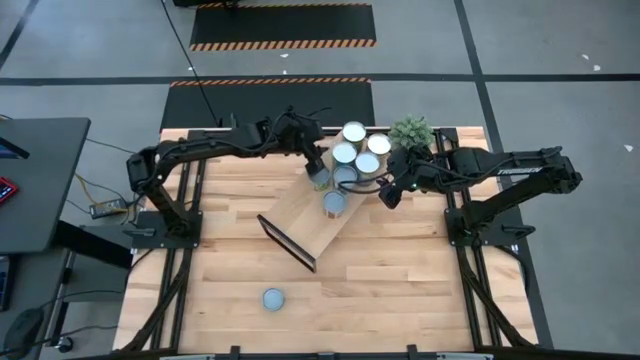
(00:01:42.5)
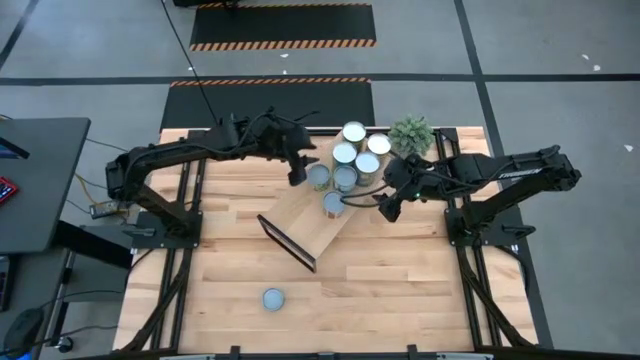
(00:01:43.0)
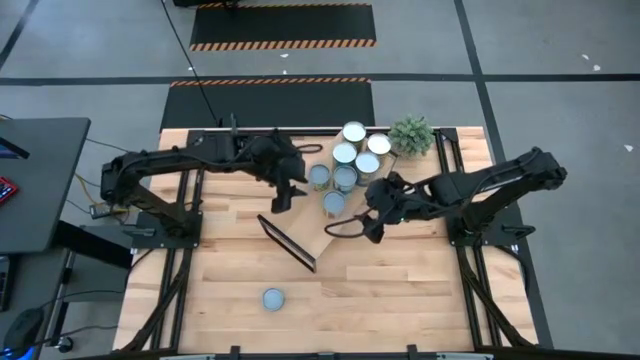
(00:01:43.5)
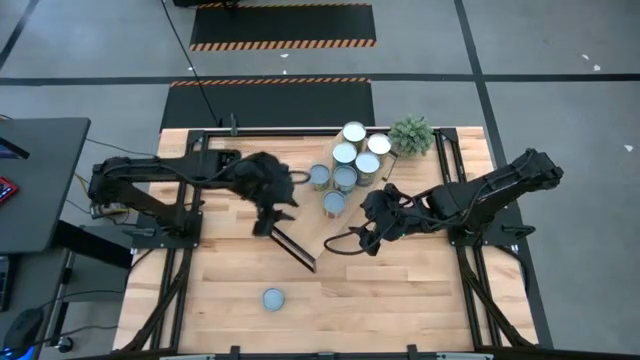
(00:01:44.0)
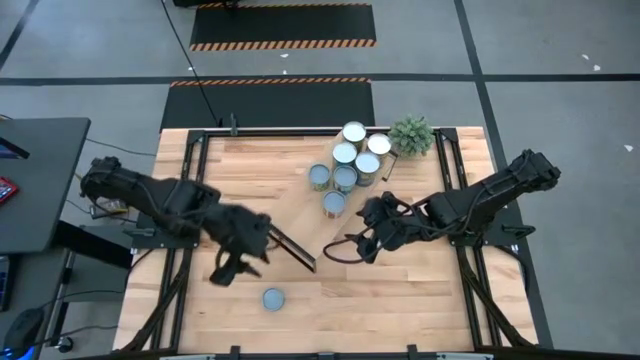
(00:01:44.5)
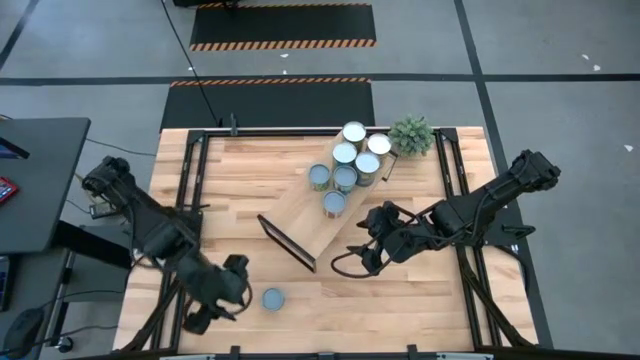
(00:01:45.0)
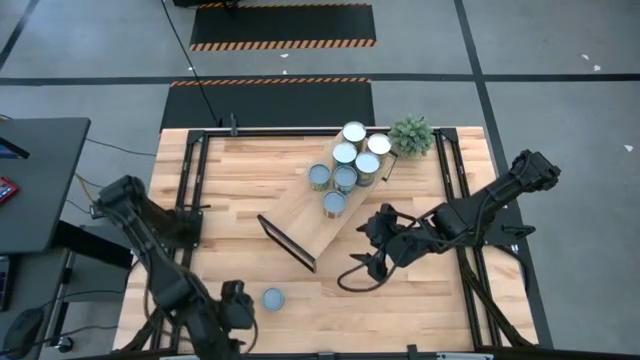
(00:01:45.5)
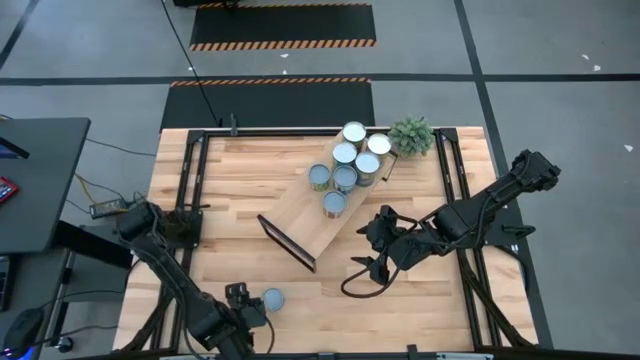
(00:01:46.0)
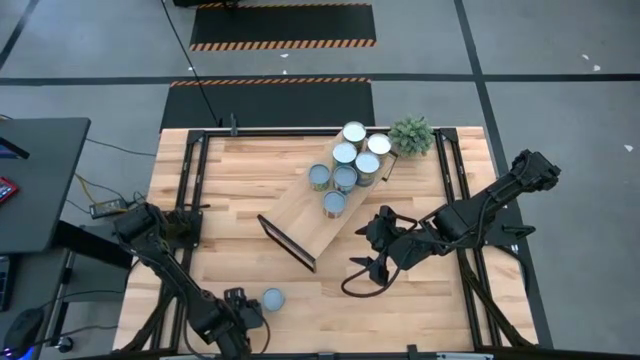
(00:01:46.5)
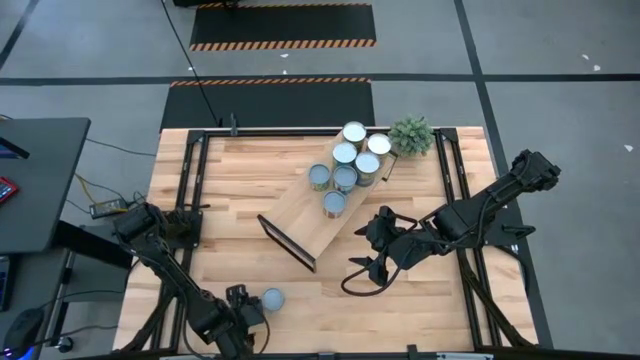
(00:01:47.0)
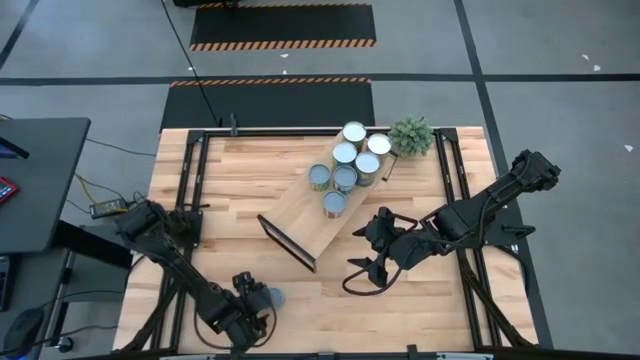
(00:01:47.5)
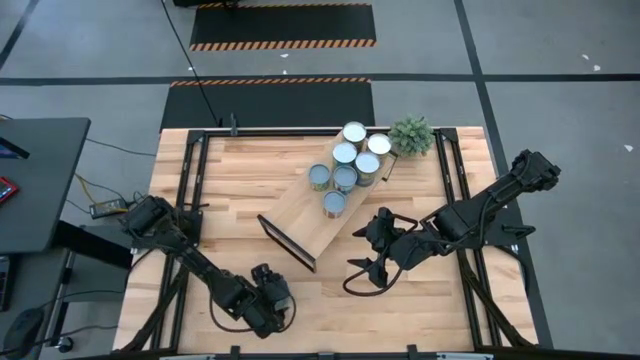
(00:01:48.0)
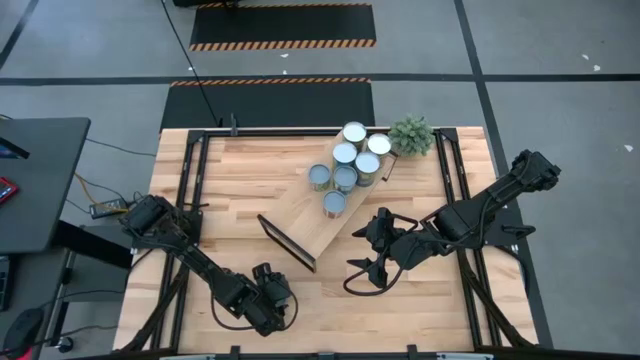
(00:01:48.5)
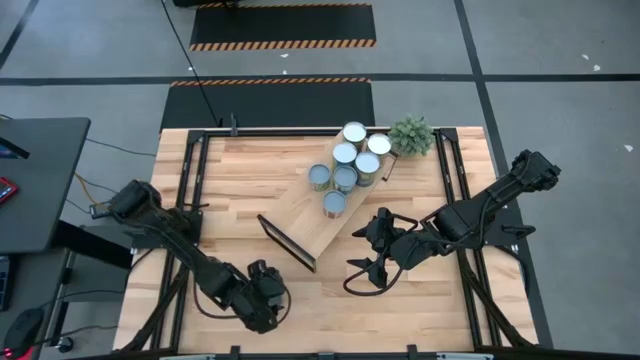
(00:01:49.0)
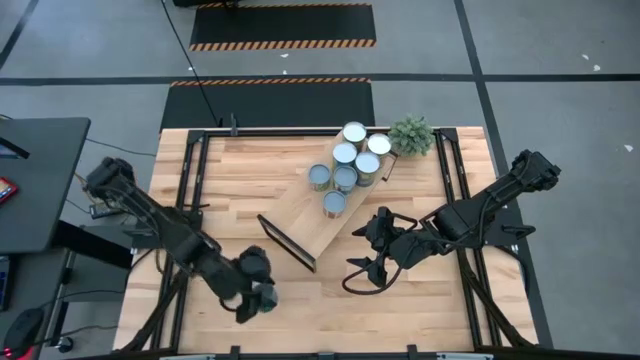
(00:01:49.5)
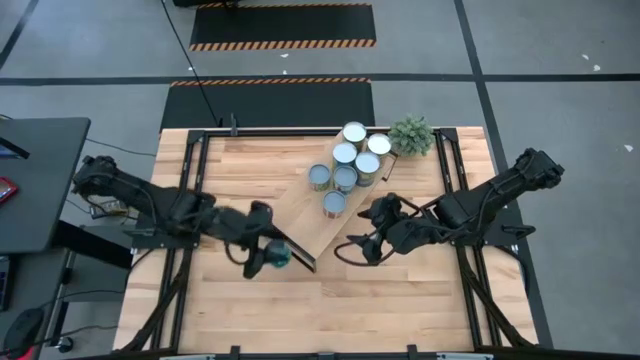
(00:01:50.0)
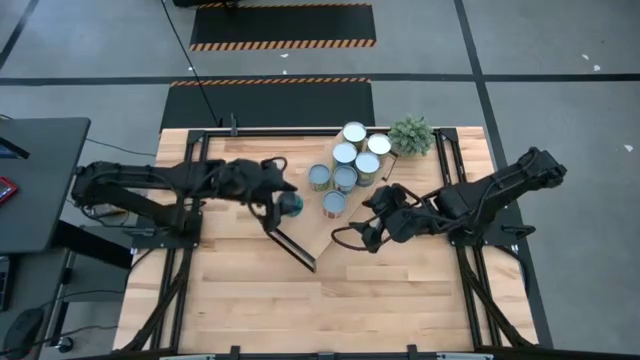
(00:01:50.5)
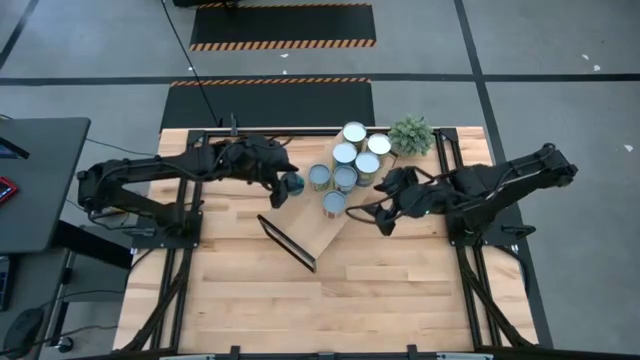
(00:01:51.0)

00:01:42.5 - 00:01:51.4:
Task: Pick and place cans onto a shelf
Put the canned tuna on the shelf

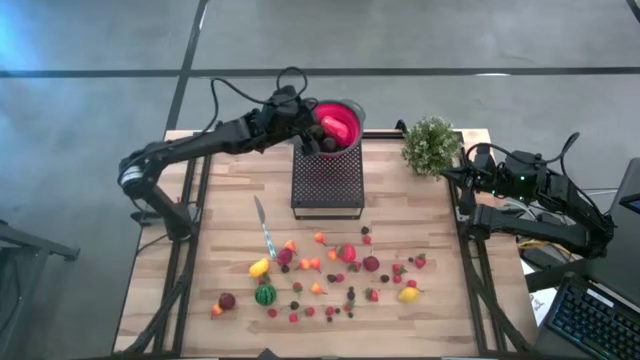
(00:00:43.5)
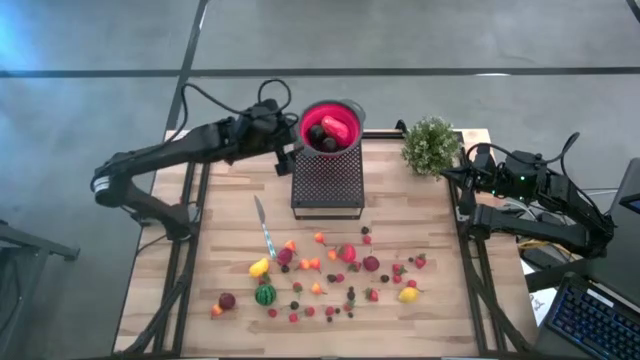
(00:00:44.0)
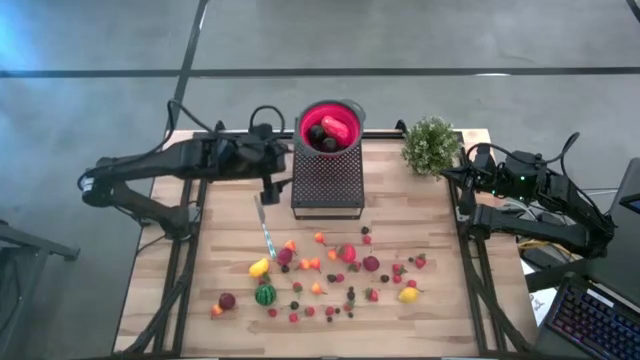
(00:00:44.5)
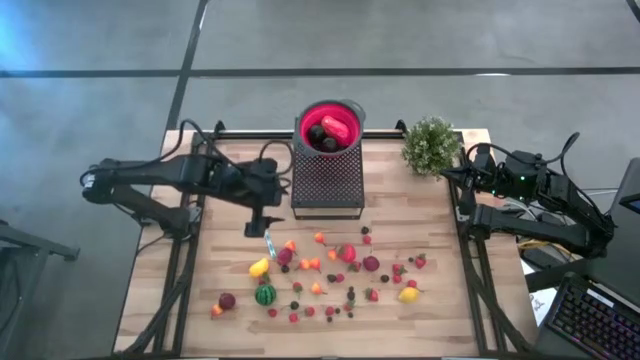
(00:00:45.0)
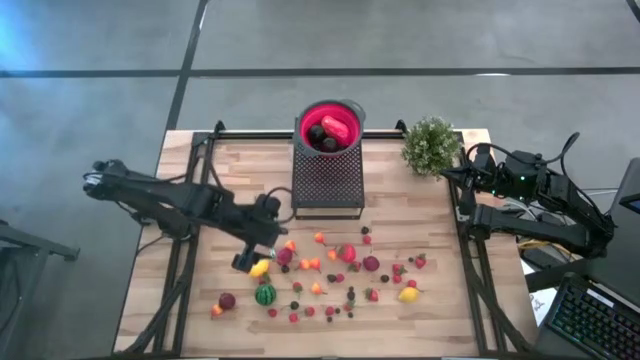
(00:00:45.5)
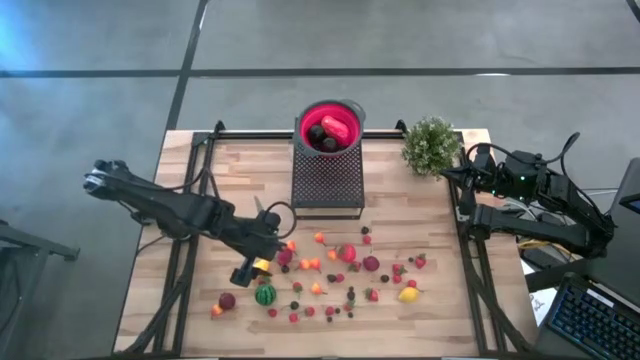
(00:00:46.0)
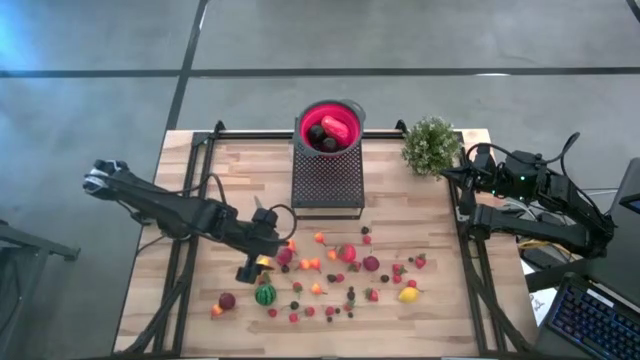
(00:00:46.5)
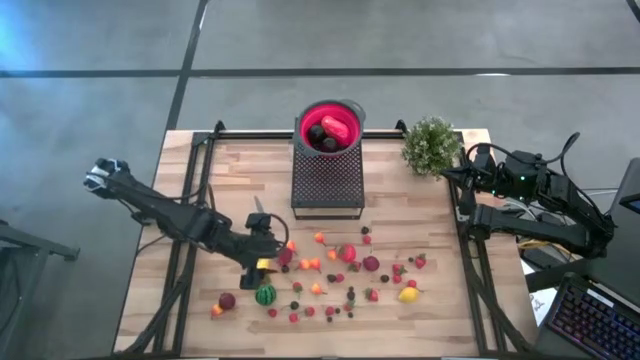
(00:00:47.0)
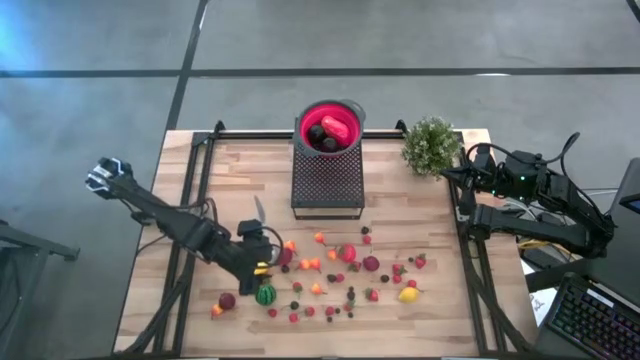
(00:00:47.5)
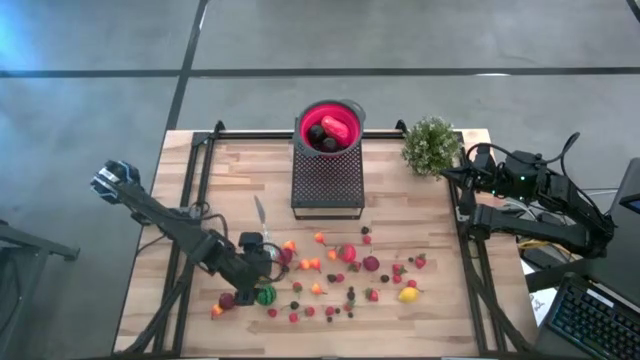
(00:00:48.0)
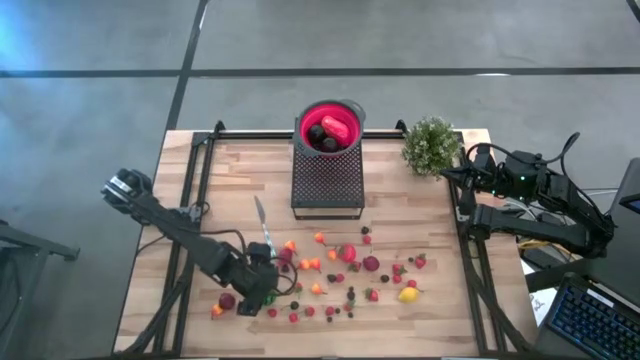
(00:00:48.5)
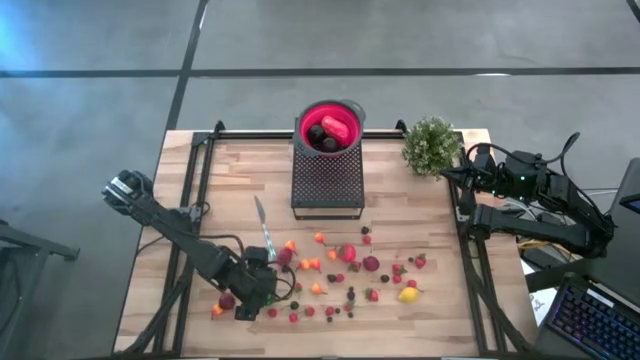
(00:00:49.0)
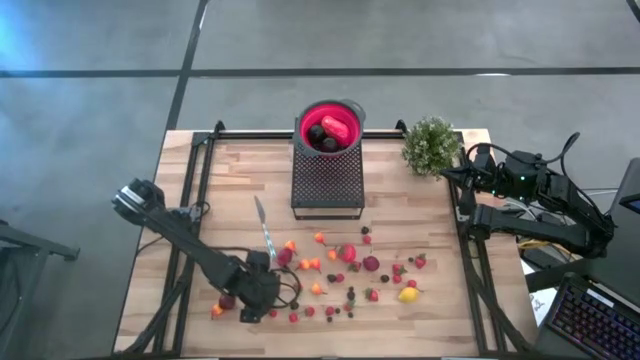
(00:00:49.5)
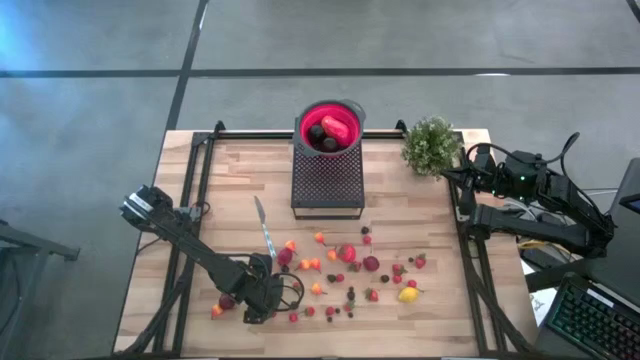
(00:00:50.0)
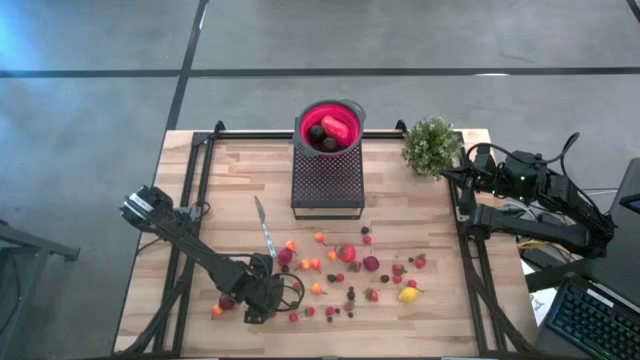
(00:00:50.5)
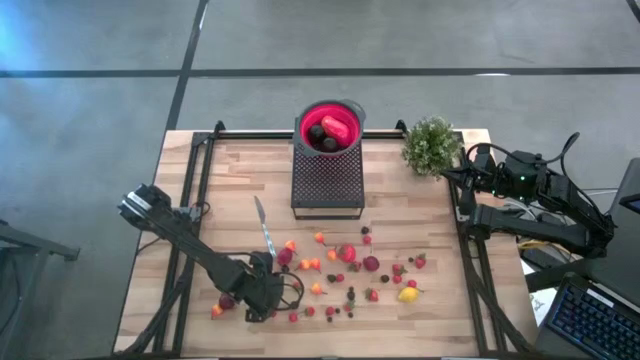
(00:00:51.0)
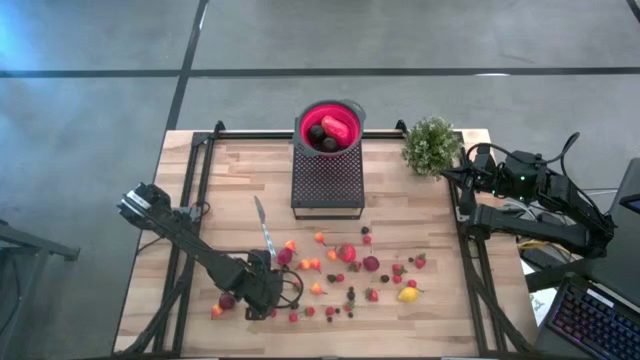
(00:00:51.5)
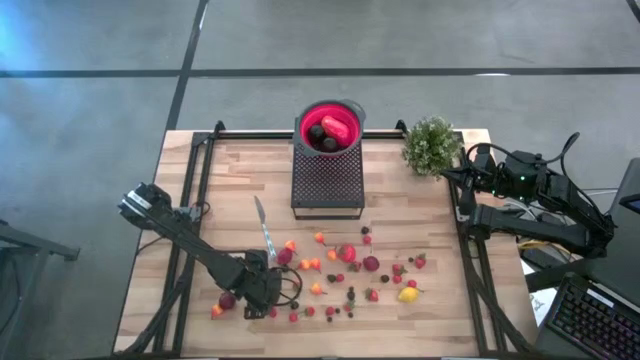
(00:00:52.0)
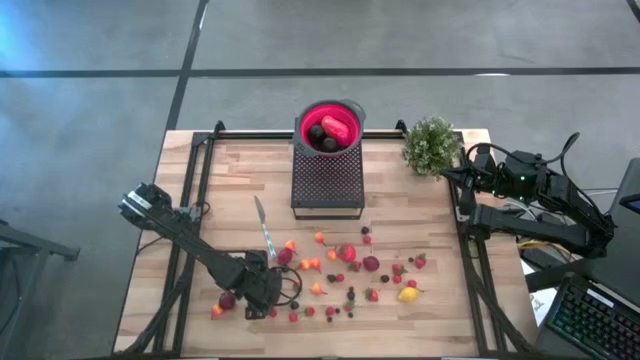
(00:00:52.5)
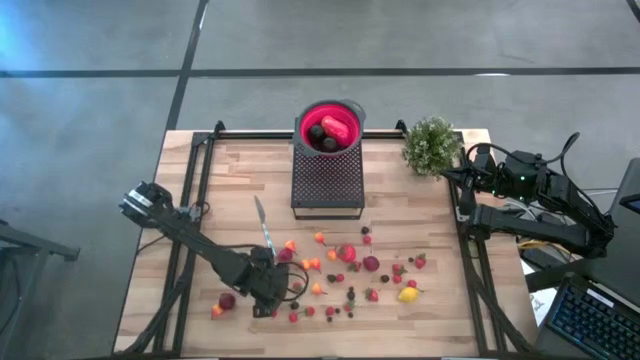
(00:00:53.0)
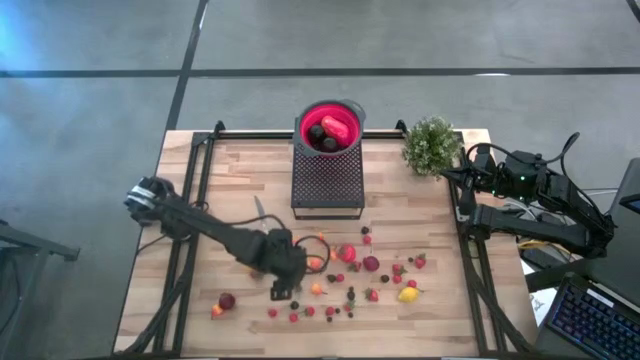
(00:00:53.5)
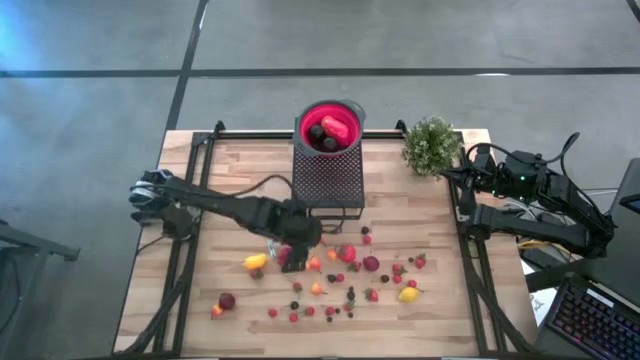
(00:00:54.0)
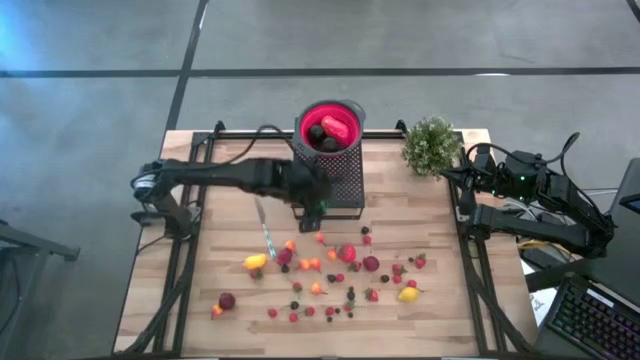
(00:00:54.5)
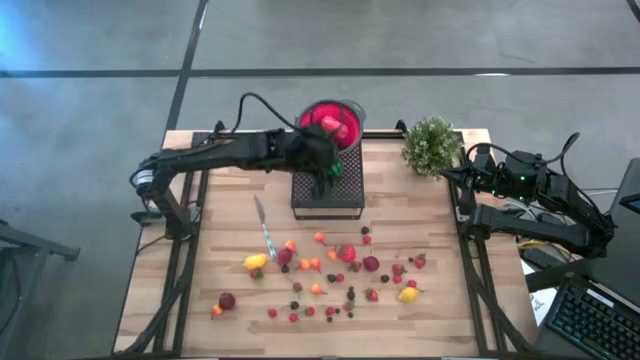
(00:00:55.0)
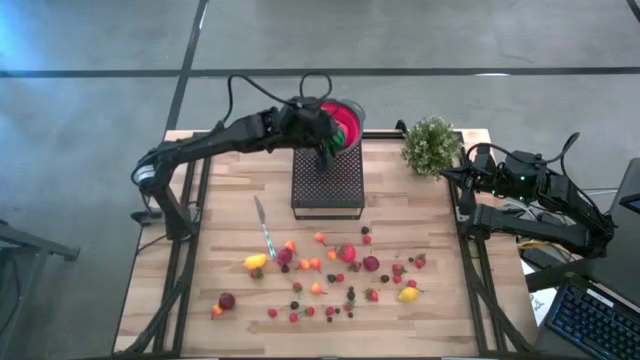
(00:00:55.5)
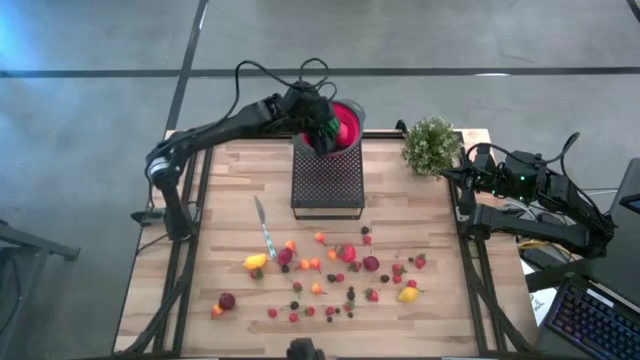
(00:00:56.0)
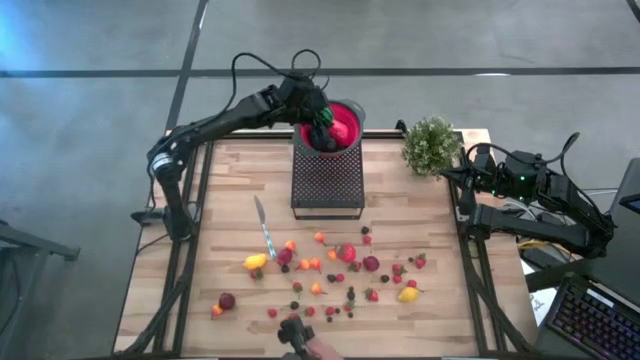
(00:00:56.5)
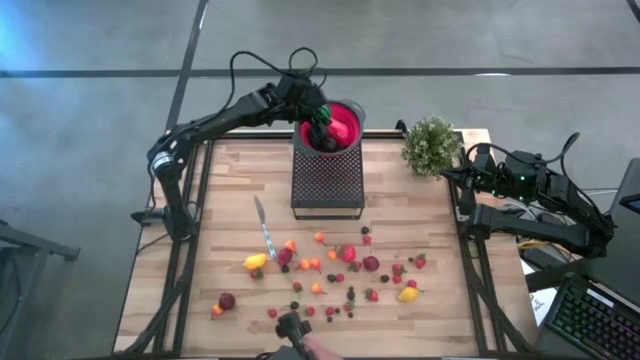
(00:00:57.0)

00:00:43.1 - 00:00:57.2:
Task: Pick & Place Fruit
Put the watermelon into the strainer bowl on the shelf
